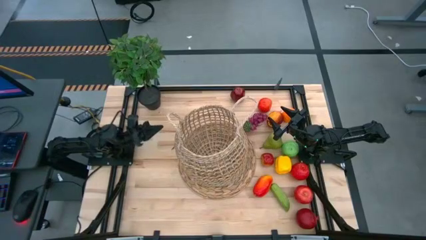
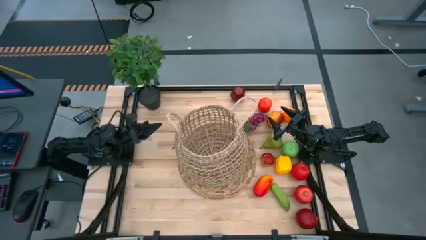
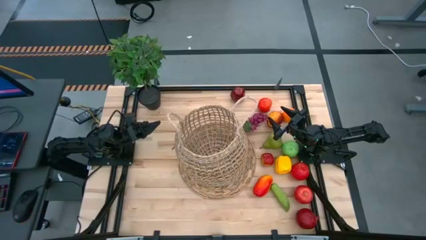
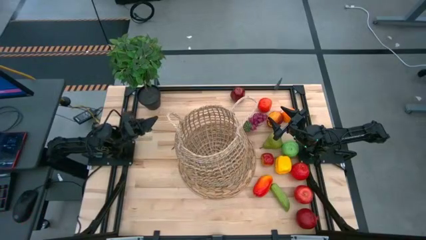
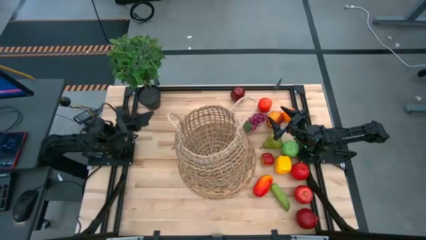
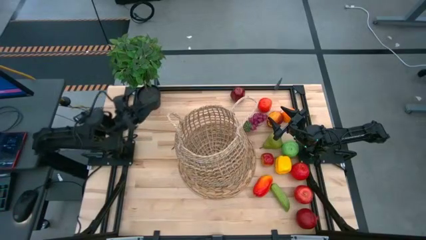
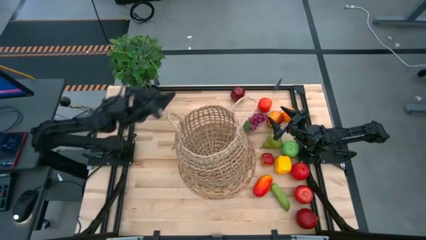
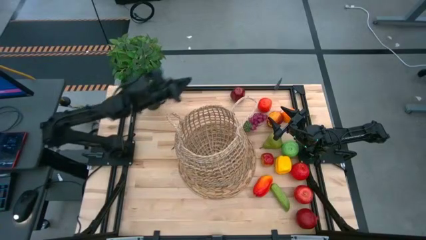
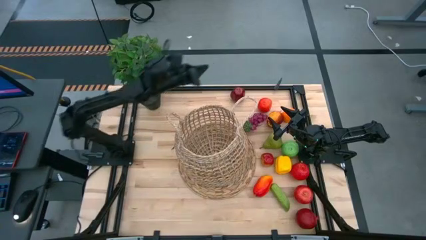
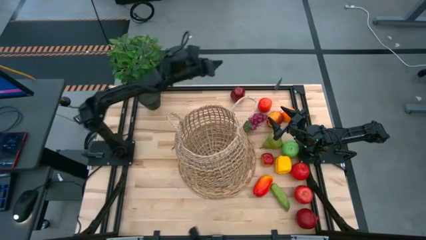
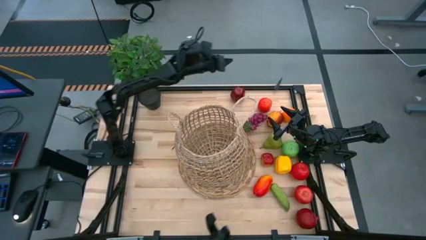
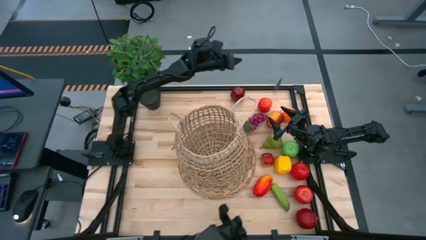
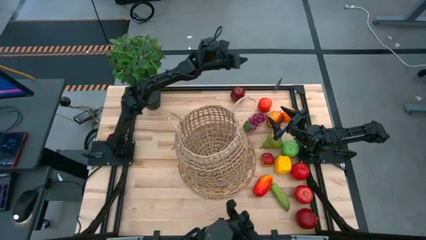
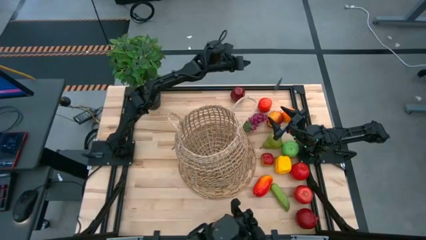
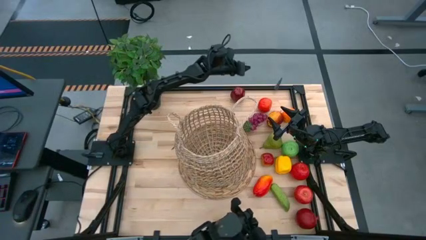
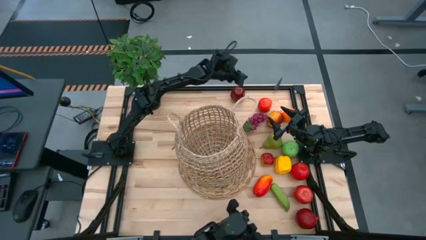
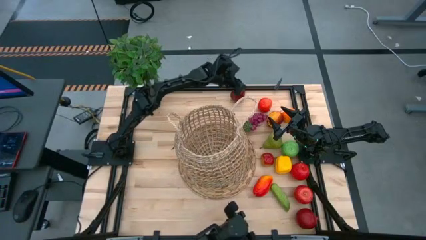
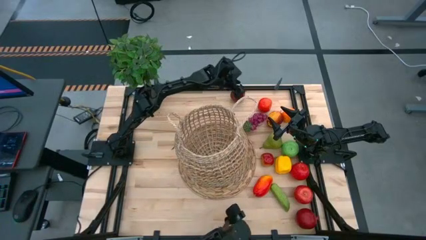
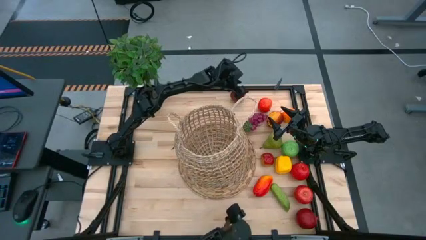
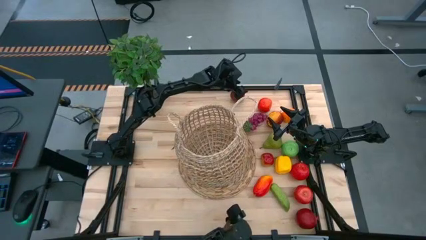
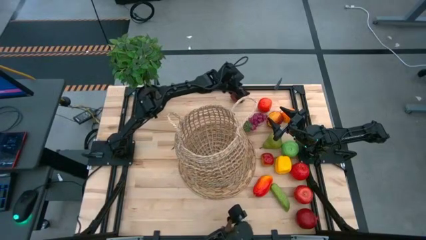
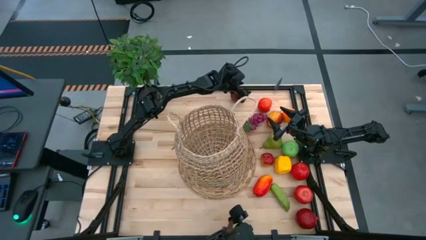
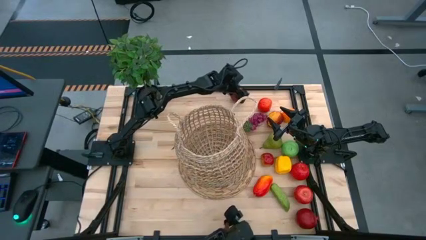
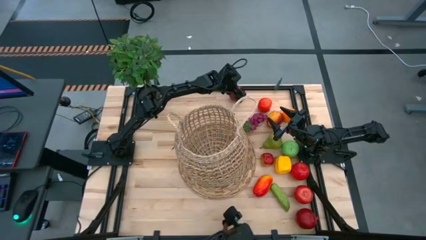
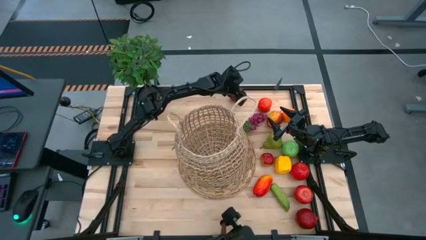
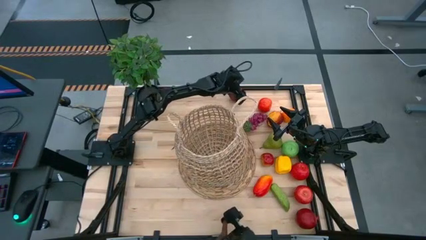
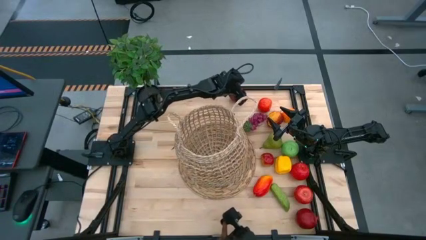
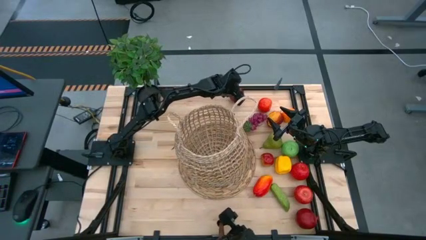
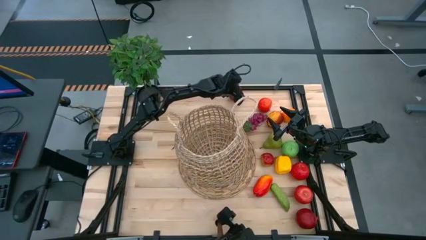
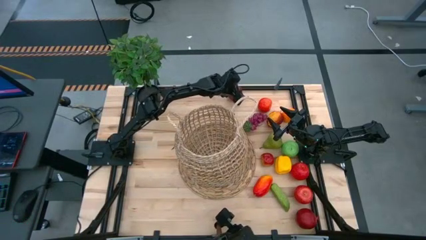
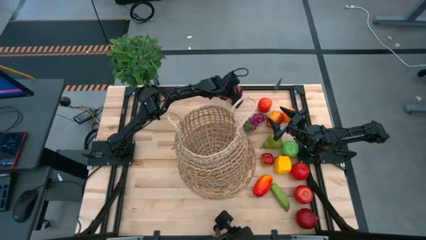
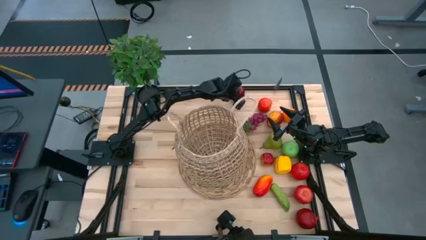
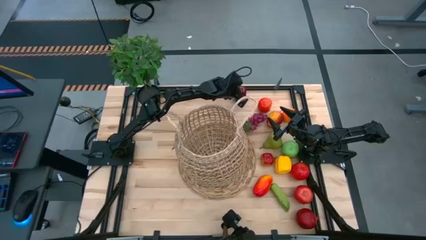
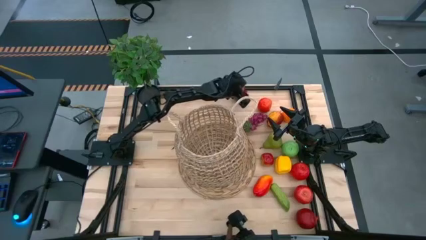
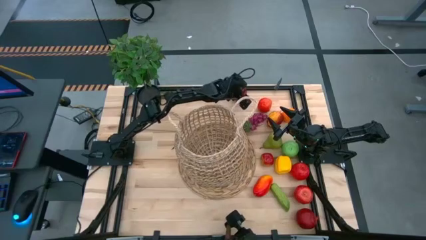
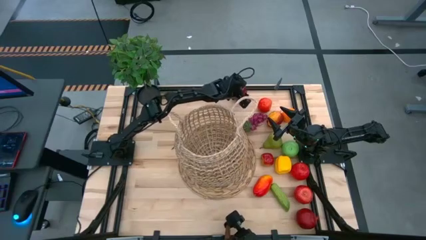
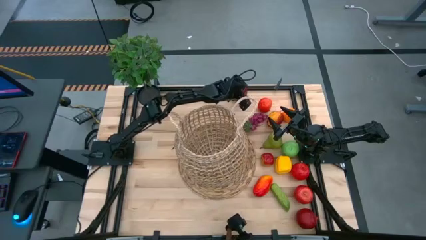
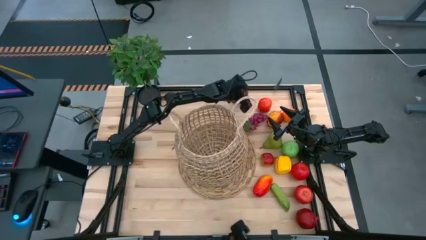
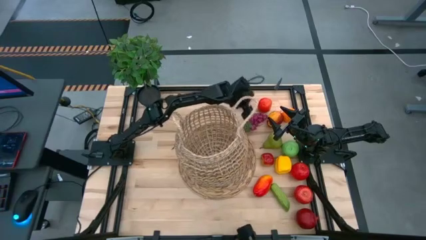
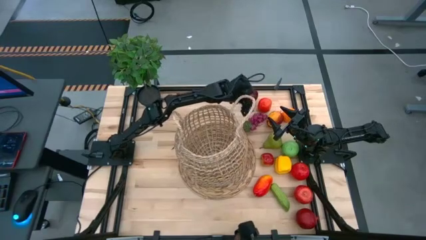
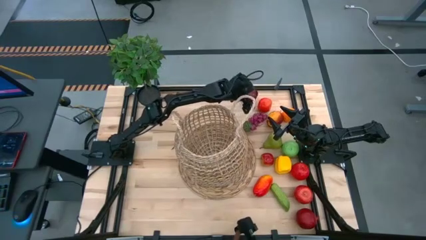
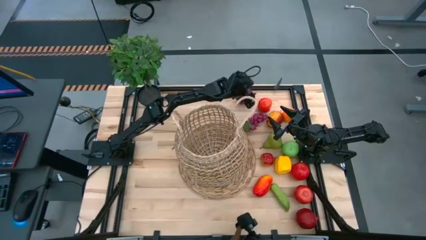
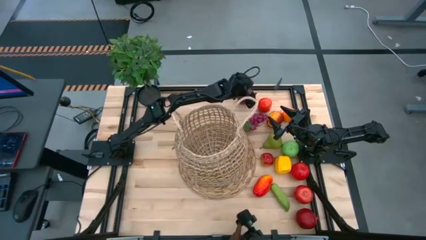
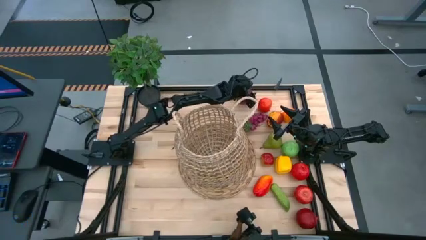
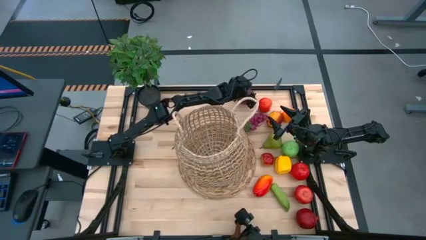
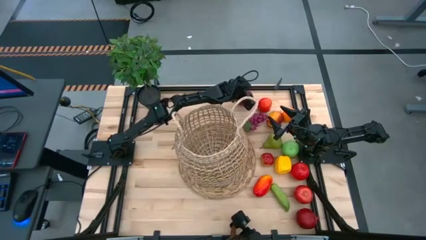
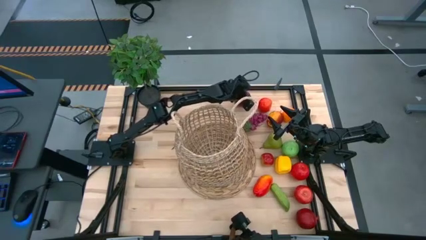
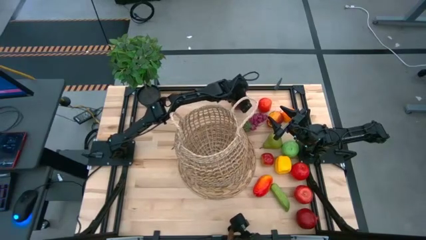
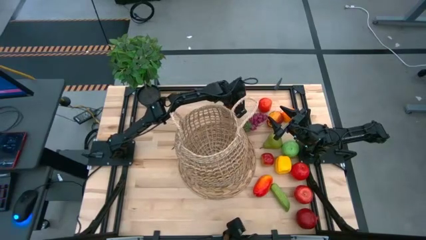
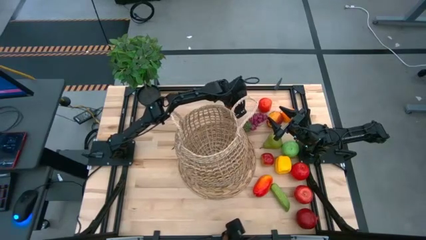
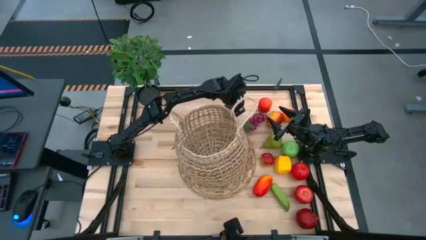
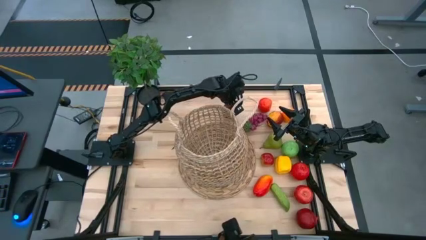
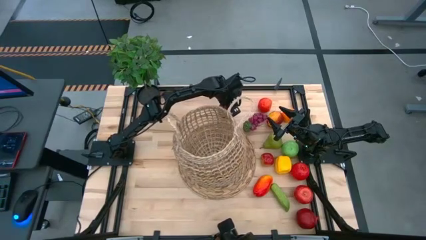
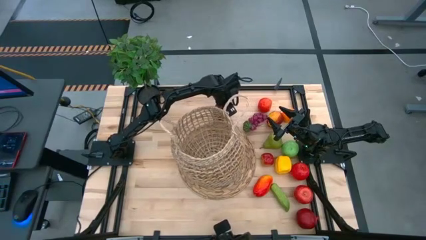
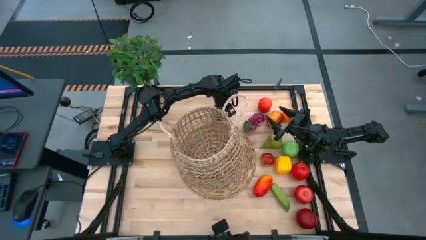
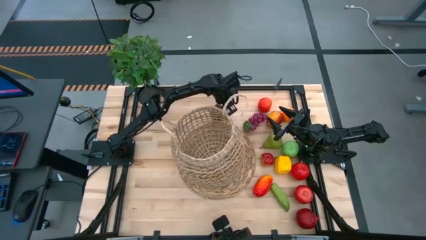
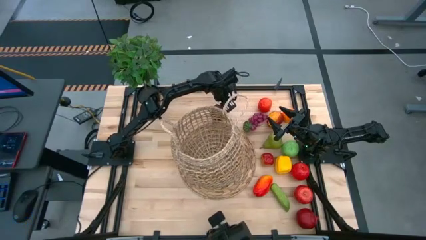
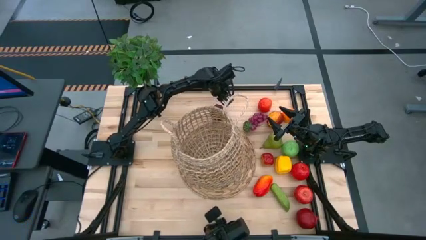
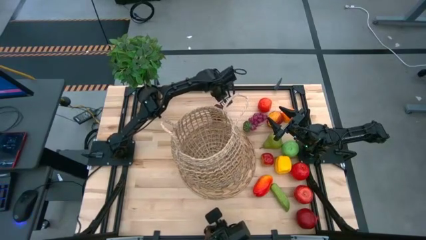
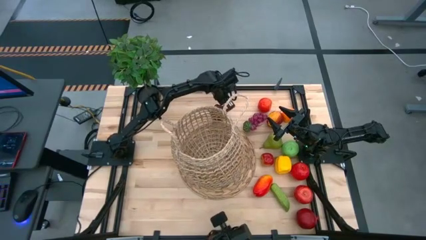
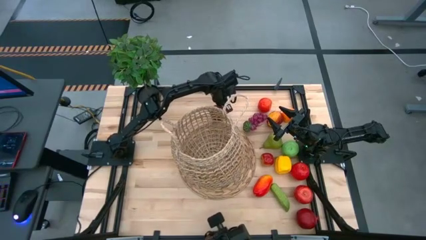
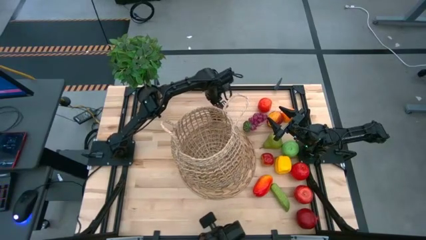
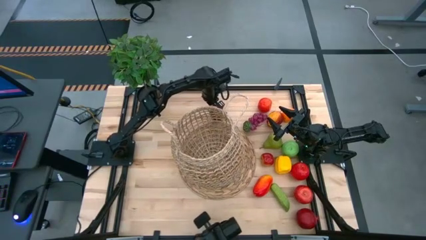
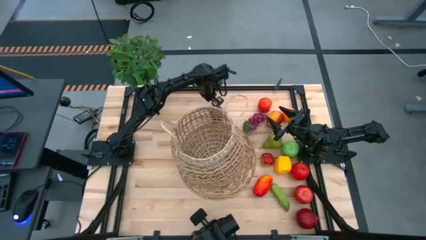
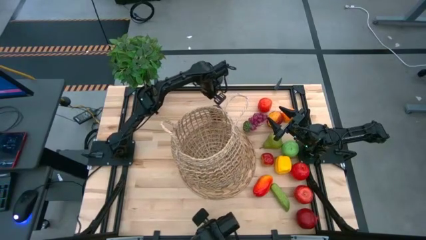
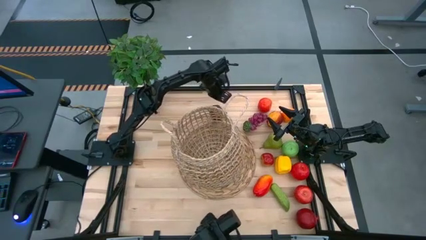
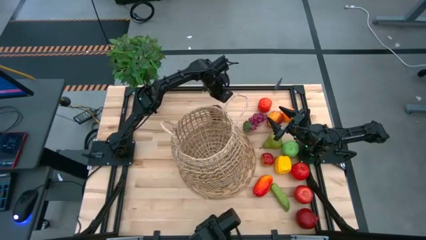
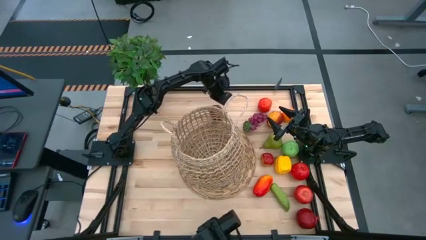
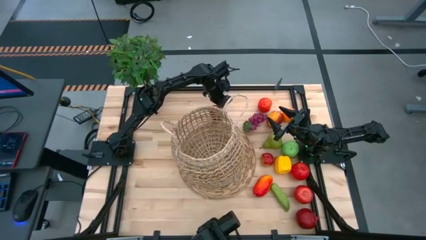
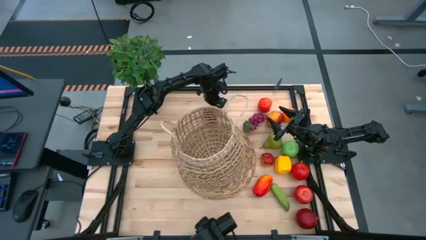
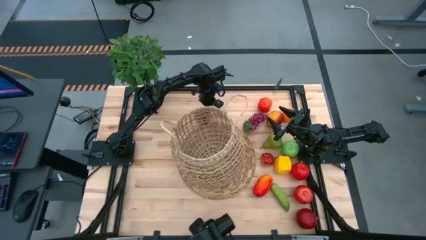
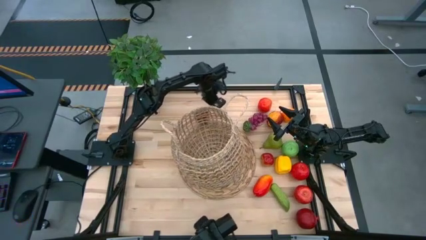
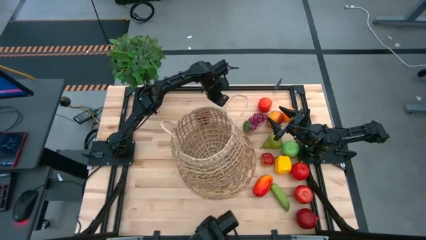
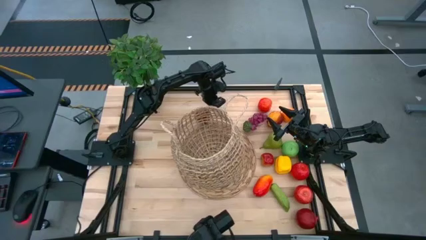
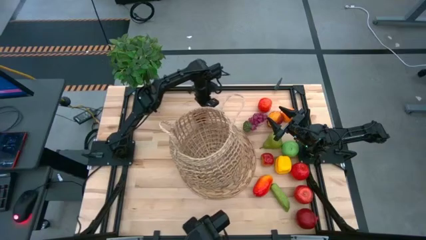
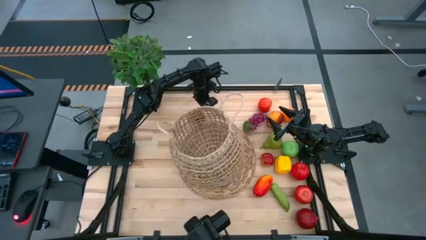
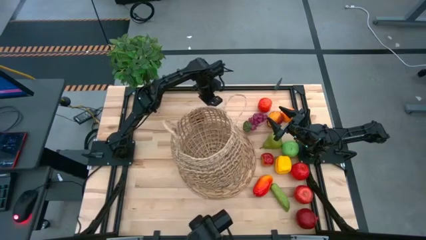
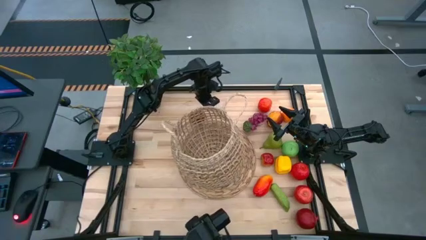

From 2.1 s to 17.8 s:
Task: Build produce basket
Put the dark red apple into the brown basket
